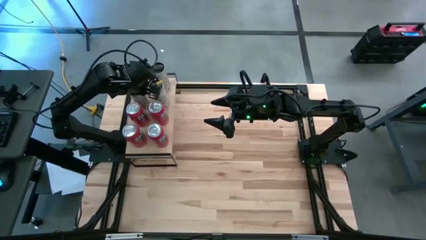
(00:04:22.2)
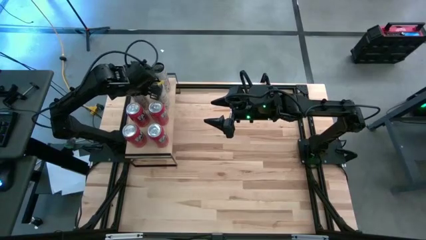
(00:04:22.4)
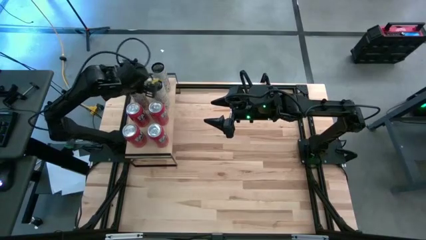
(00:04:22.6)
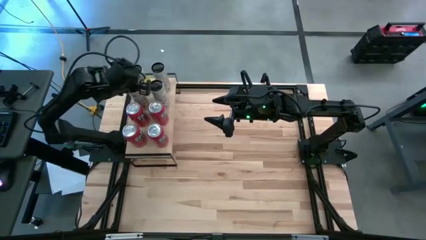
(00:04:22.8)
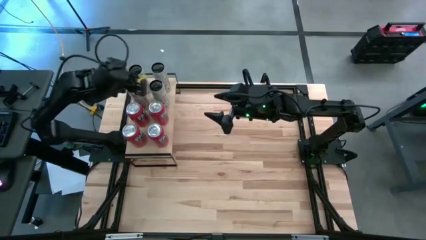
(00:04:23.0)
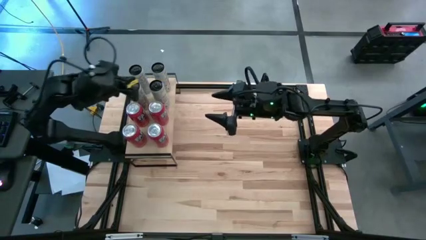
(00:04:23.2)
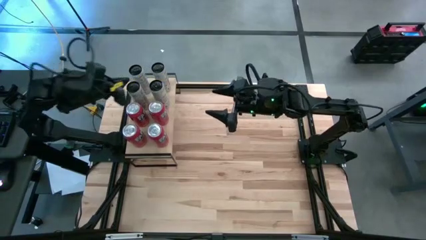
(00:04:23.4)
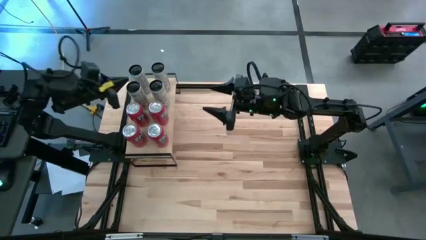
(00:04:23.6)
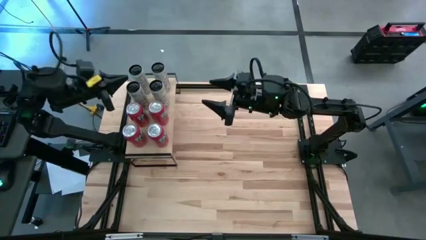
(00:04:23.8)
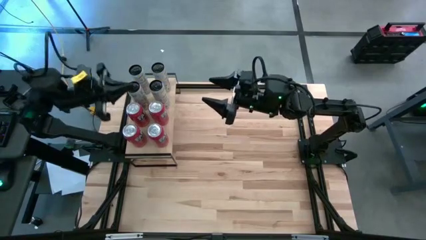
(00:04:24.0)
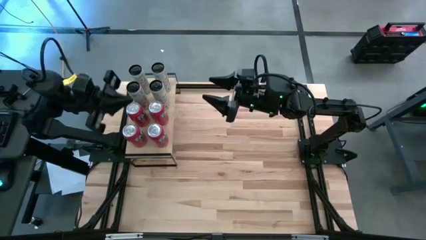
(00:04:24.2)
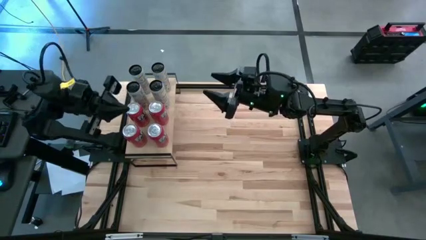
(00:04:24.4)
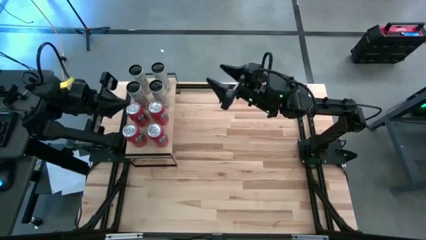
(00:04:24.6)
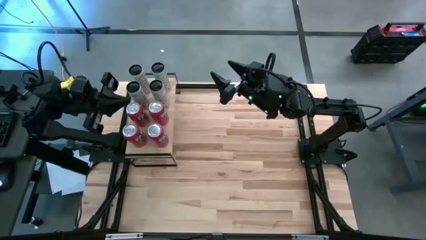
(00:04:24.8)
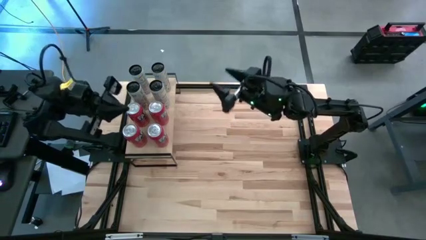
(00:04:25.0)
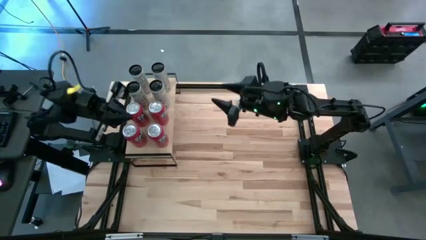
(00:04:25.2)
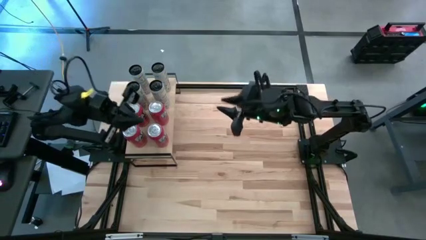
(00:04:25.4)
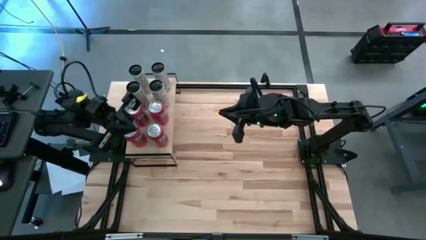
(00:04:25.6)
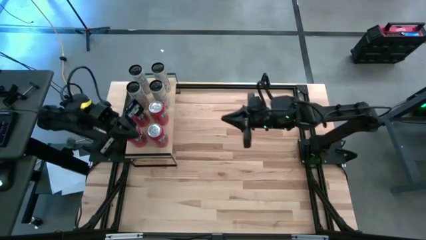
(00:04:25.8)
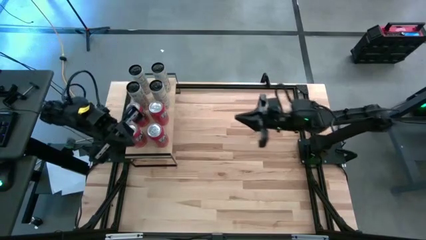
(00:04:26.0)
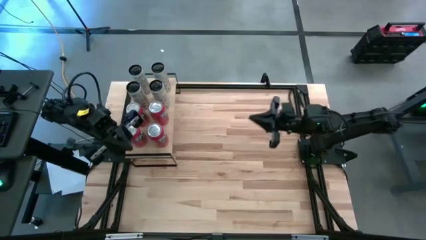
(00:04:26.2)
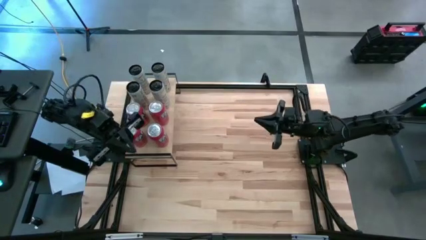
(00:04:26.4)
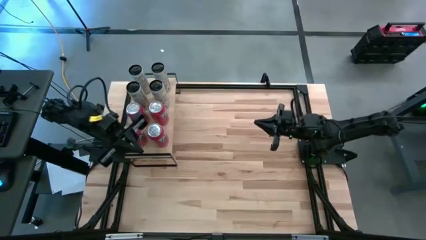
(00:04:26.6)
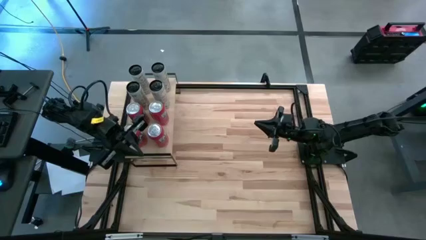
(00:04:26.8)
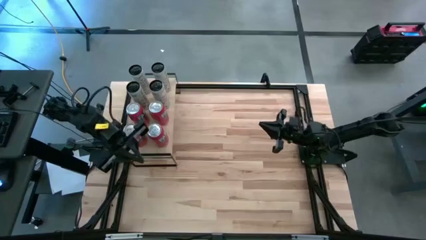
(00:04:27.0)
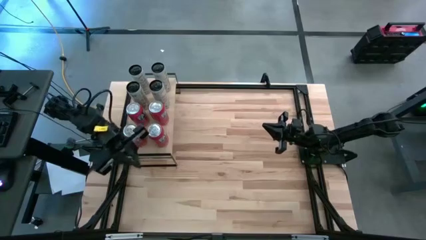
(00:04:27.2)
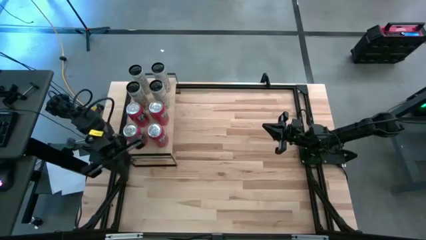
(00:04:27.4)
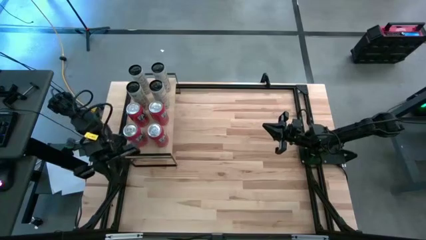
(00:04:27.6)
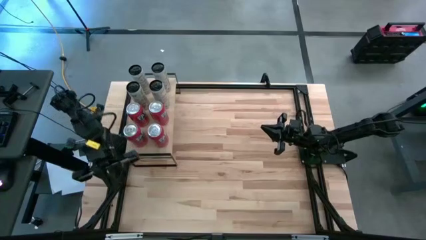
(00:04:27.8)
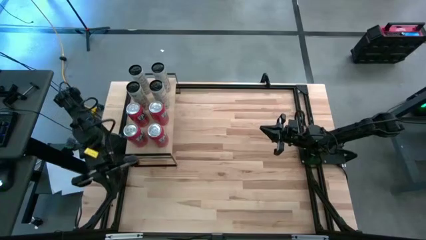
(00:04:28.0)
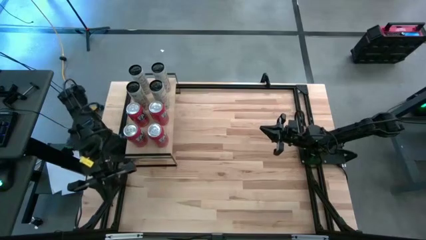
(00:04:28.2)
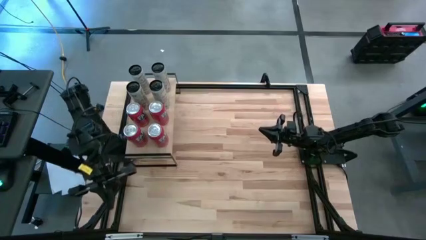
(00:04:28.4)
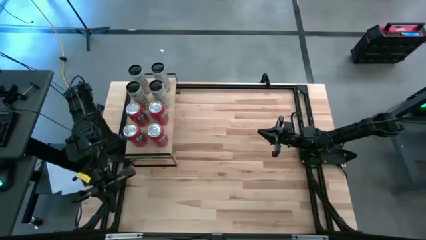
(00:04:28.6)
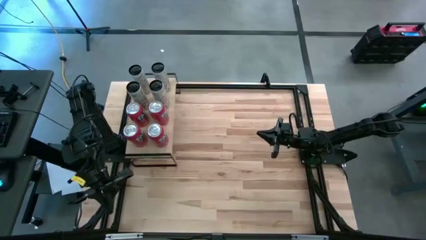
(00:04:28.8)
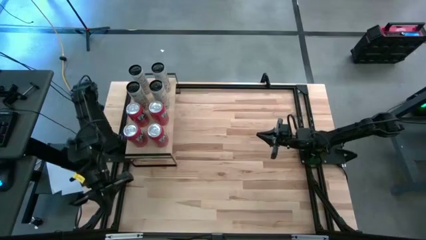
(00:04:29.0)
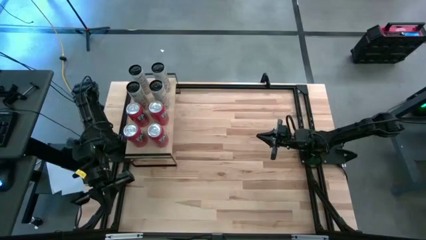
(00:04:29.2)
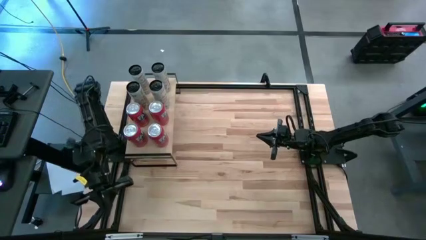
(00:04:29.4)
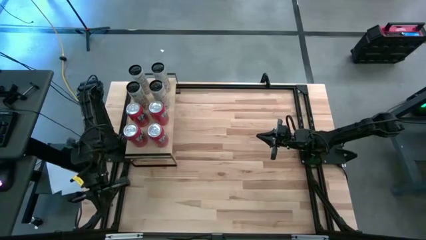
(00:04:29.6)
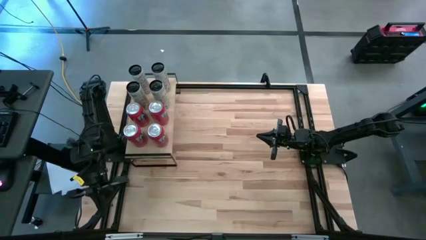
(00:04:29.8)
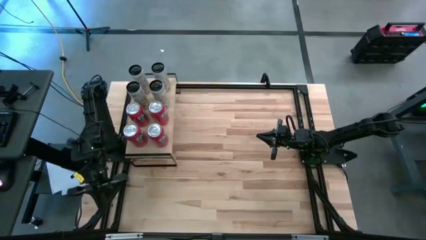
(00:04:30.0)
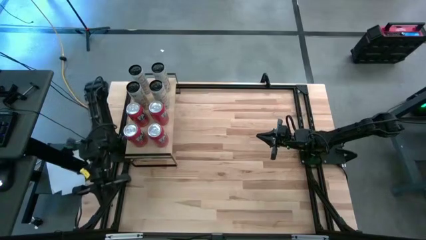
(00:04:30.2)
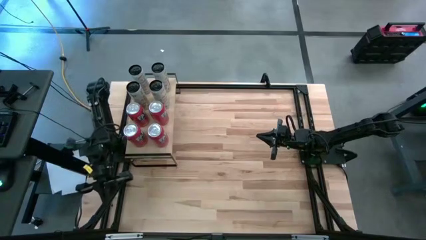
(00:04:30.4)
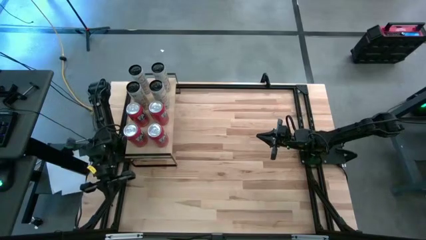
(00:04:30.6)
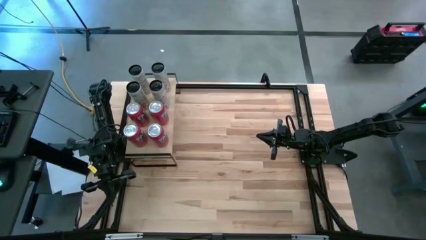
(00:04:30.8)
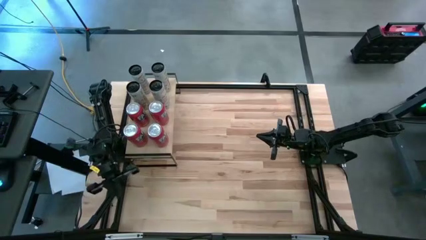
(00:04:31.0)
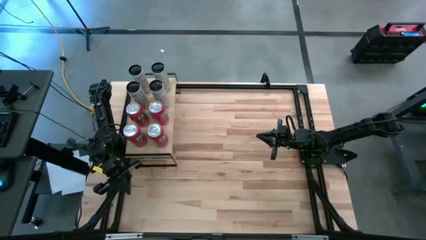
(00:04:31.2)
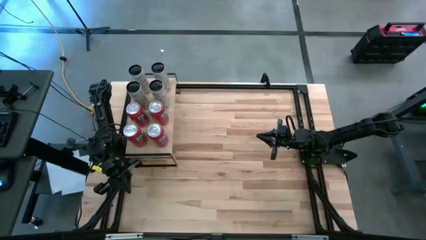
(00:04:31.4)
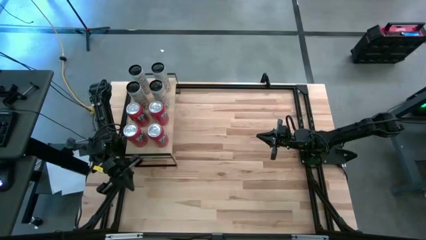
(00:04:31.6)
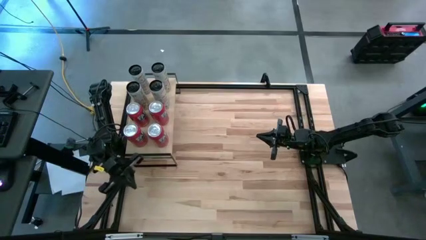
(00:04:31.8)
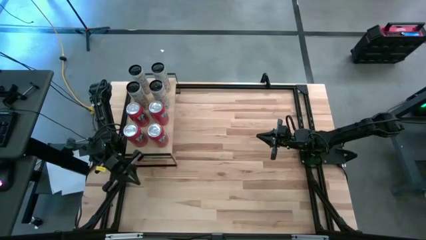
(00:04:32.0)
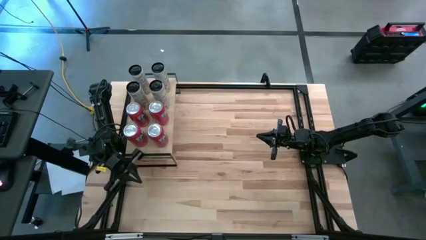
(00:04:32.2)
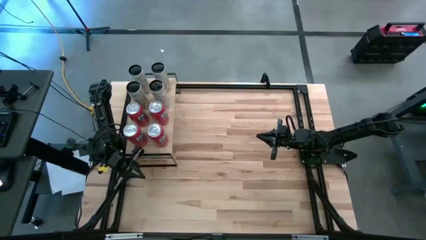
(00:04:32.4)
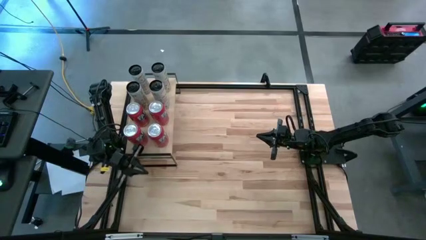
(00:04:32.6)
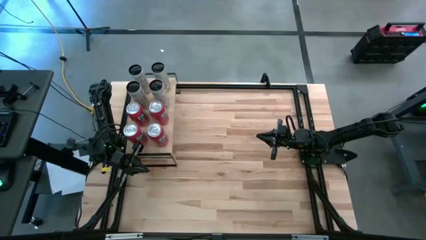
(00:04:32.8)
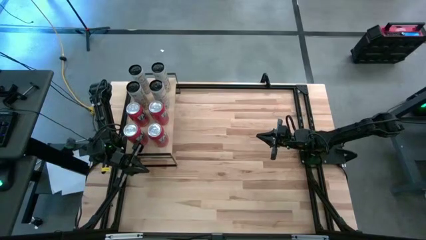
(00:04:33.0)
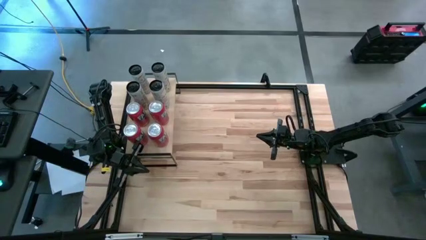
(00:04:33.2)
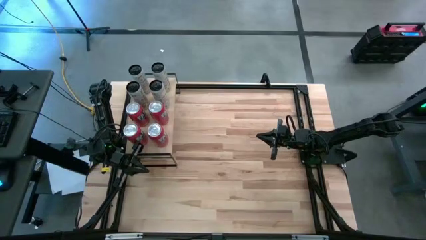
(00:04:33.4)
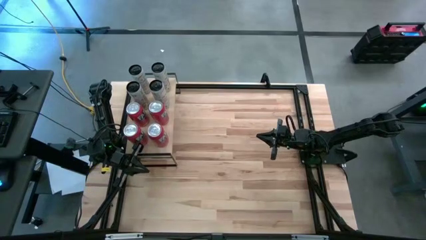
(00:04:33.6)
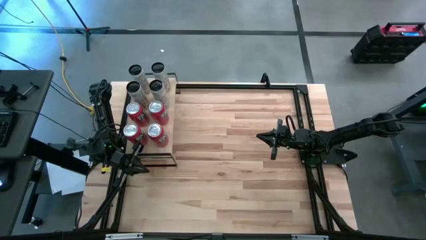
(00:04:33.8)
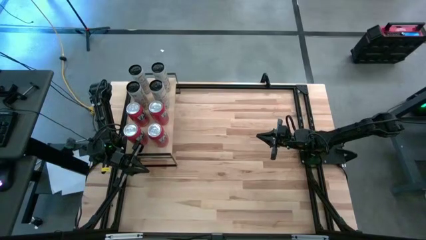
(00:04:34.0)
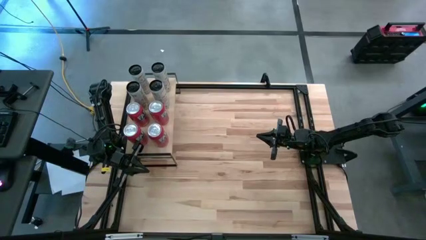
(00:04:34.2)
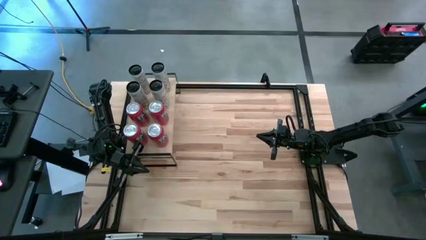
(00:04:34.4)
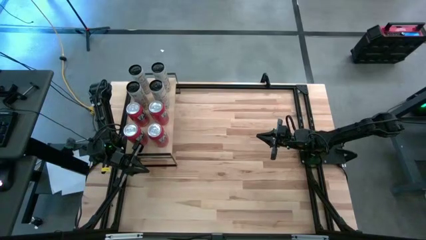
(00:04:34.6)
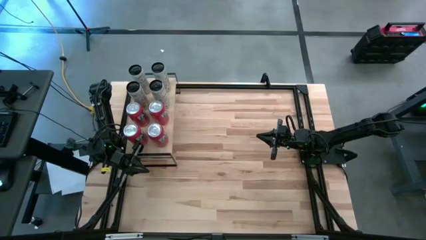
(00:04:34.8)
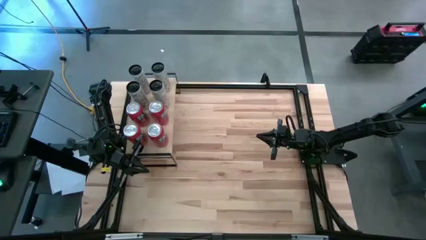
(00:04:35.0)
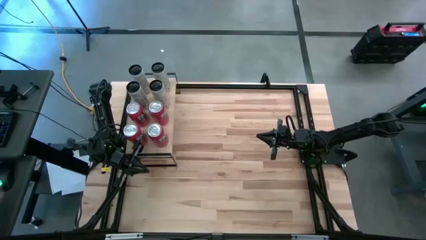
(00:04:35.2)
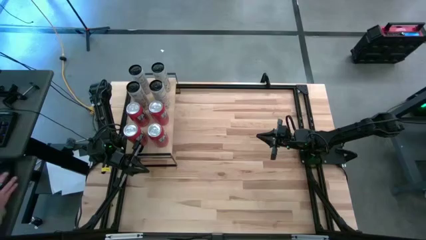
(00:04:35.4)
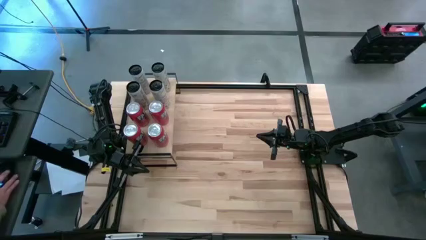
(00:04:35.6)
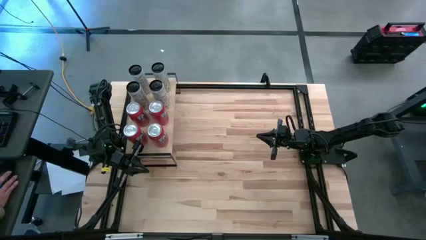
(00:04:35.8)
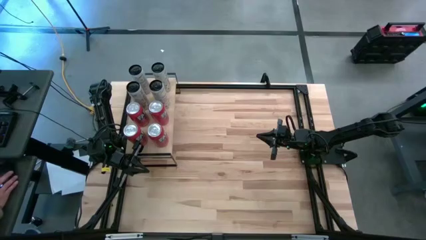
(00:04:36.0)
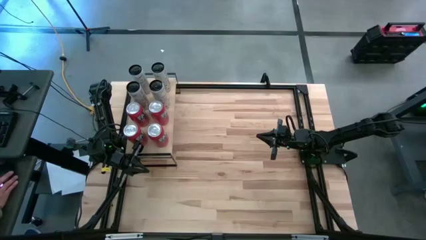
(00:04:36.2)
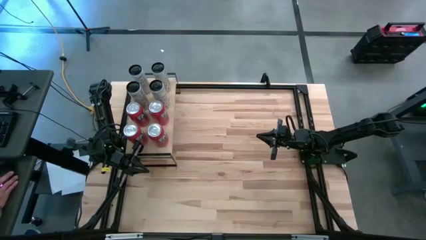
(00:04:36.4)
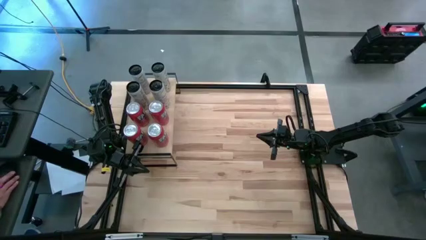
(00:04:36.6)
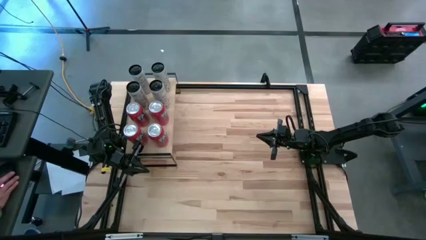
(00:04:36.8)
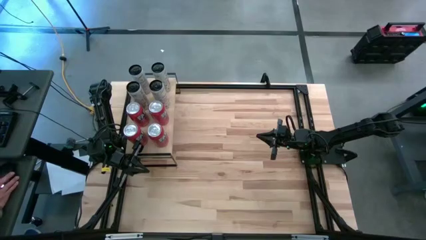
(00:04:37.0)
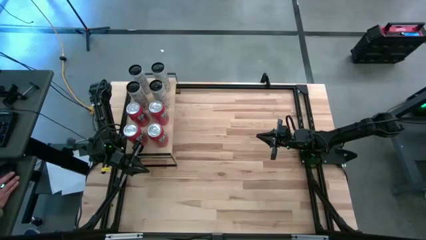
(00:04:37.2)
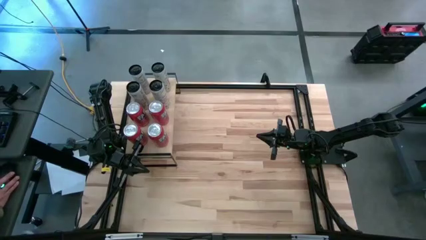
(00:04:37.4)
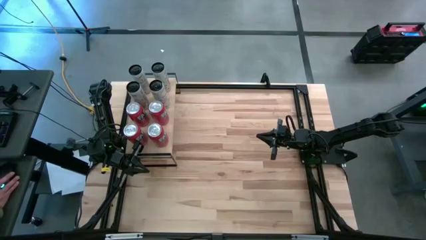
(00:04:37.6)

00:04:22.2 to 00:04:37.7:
Task: Place canned beverage on shelf
Return to Home Position
